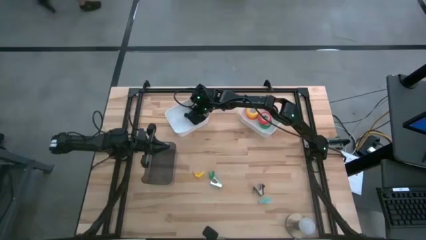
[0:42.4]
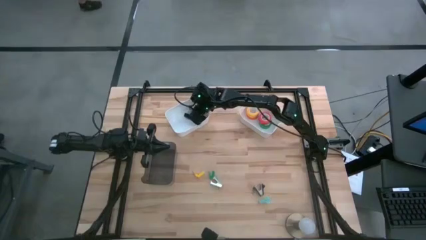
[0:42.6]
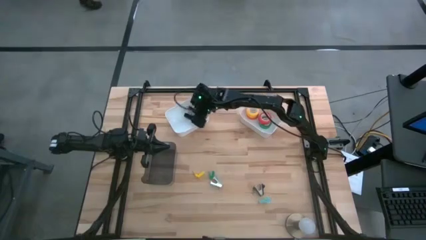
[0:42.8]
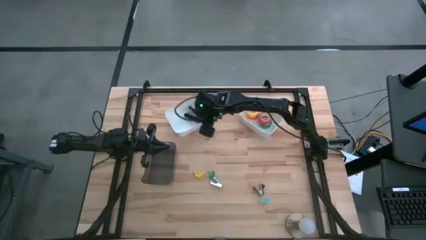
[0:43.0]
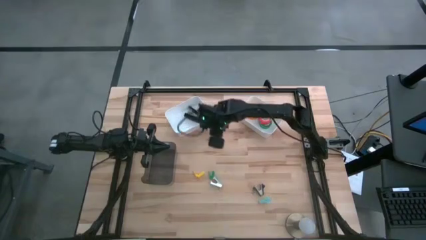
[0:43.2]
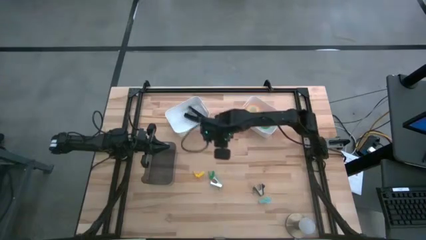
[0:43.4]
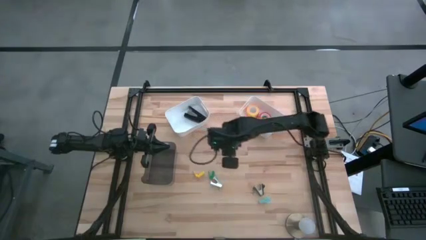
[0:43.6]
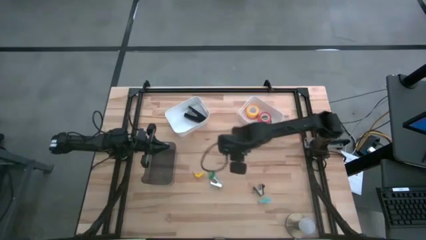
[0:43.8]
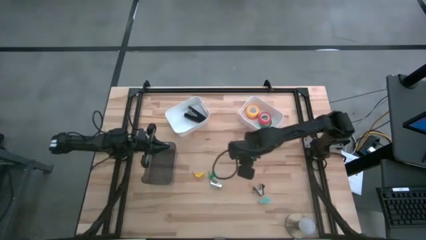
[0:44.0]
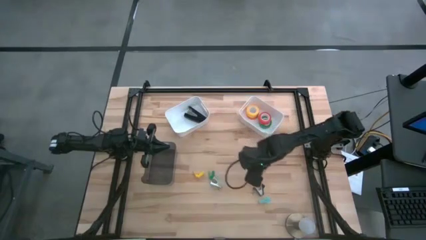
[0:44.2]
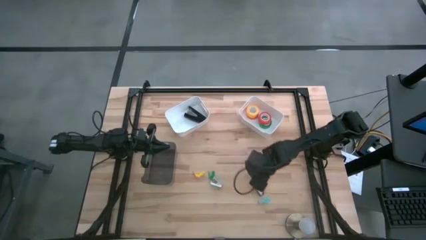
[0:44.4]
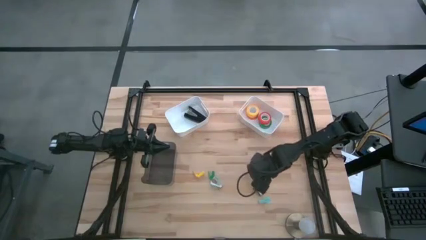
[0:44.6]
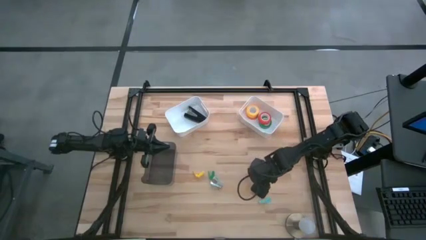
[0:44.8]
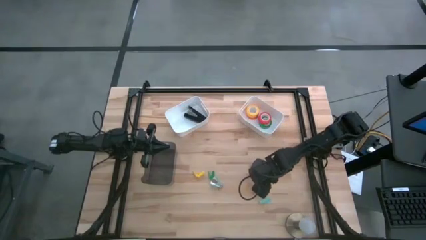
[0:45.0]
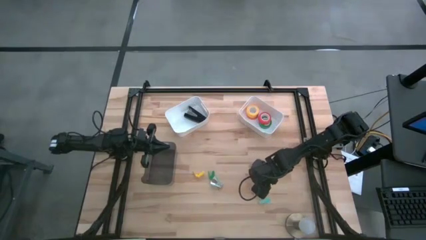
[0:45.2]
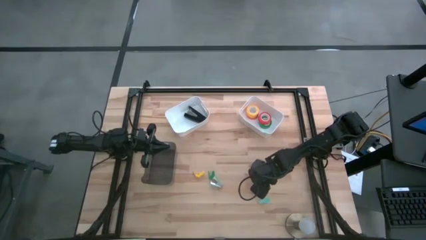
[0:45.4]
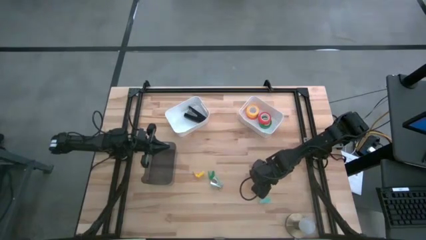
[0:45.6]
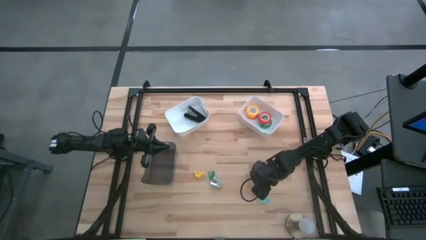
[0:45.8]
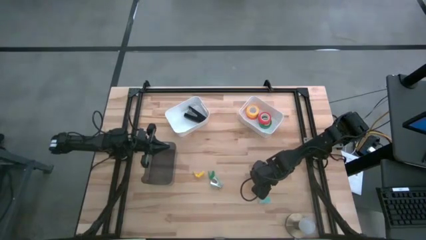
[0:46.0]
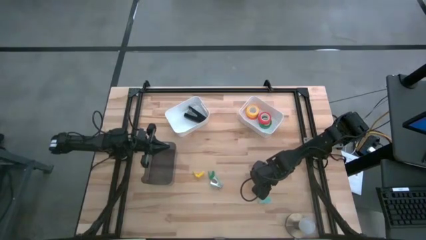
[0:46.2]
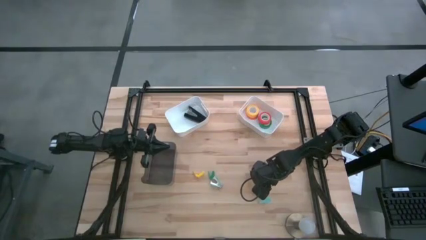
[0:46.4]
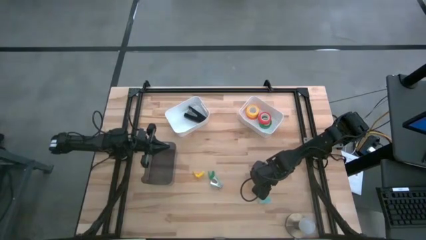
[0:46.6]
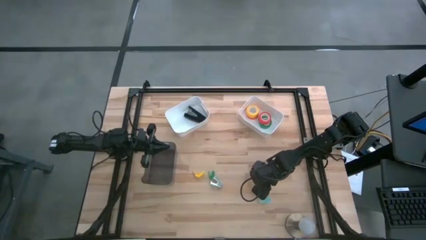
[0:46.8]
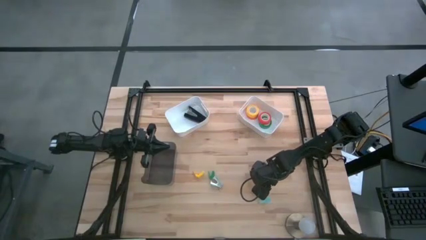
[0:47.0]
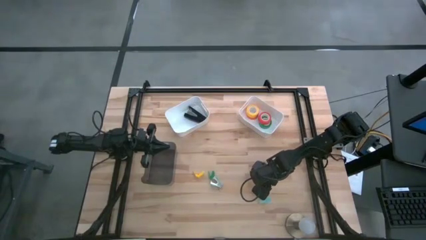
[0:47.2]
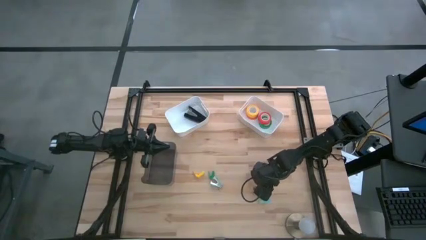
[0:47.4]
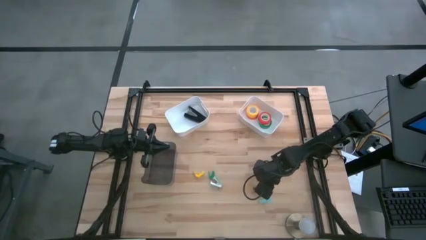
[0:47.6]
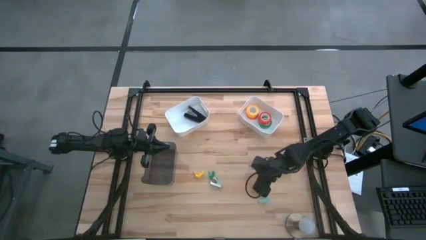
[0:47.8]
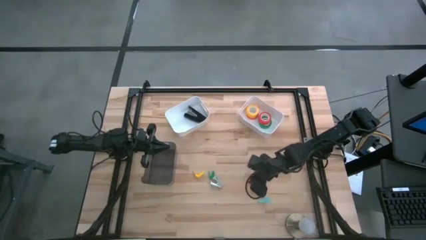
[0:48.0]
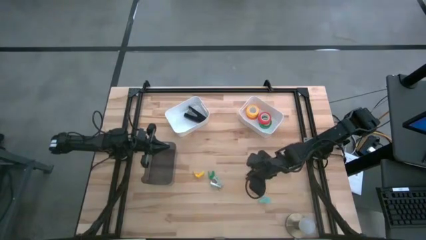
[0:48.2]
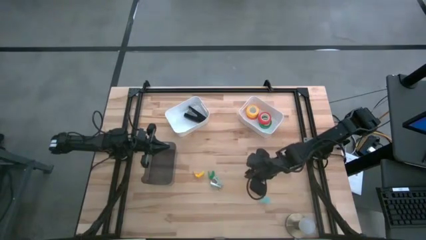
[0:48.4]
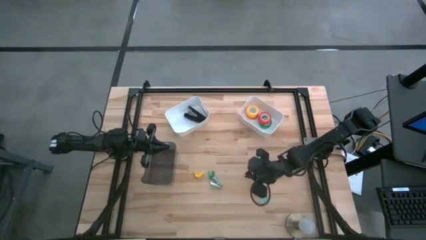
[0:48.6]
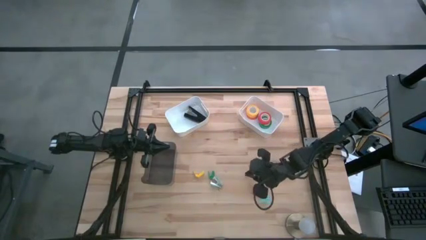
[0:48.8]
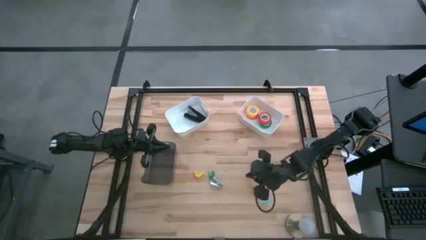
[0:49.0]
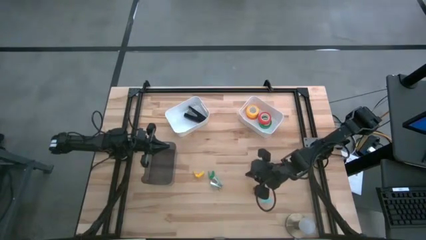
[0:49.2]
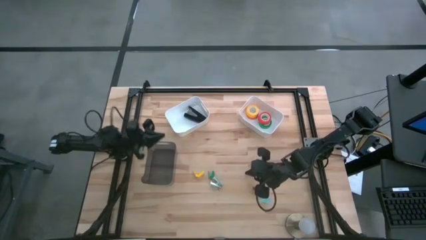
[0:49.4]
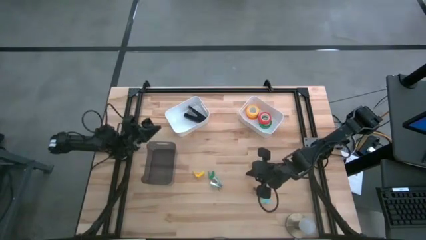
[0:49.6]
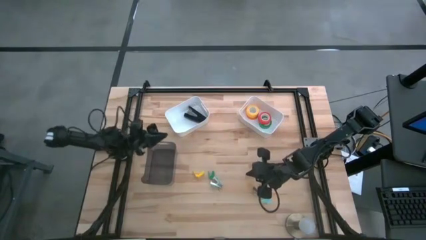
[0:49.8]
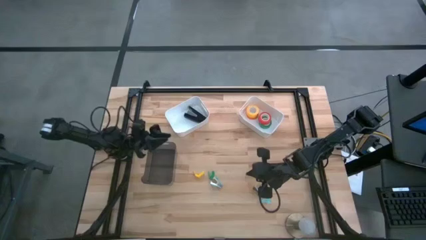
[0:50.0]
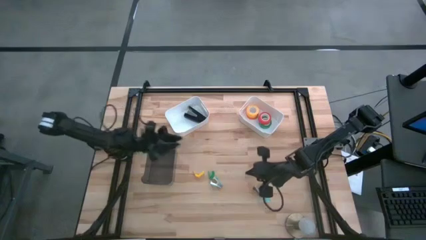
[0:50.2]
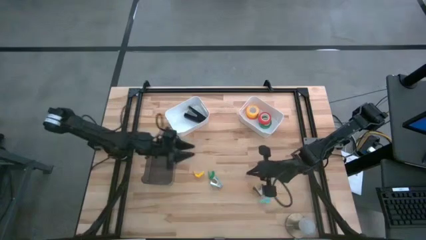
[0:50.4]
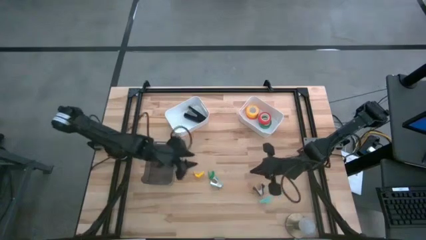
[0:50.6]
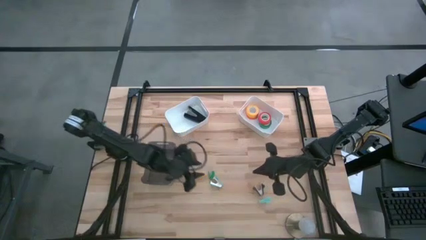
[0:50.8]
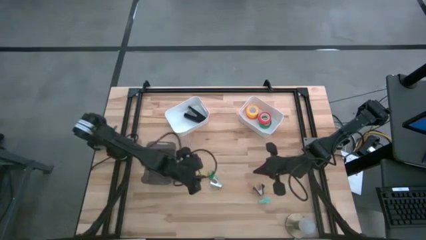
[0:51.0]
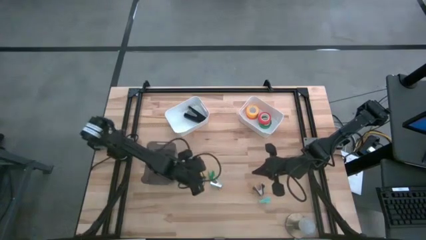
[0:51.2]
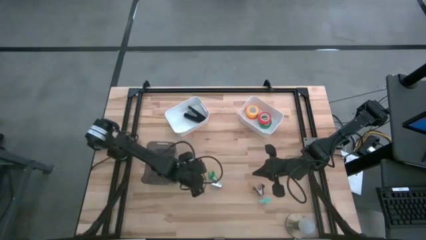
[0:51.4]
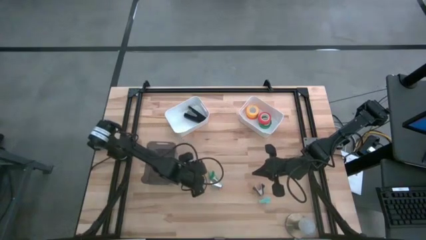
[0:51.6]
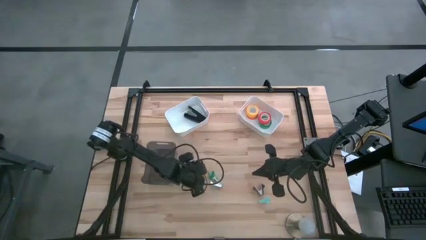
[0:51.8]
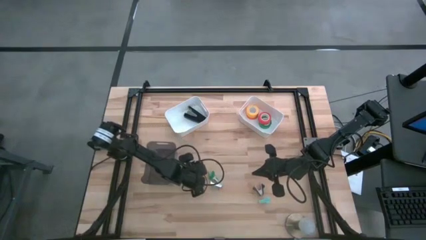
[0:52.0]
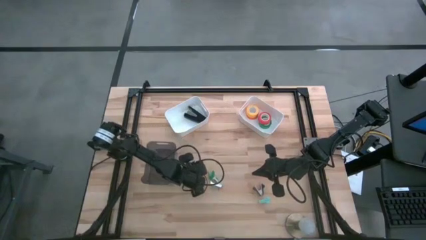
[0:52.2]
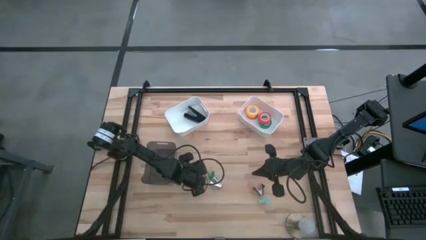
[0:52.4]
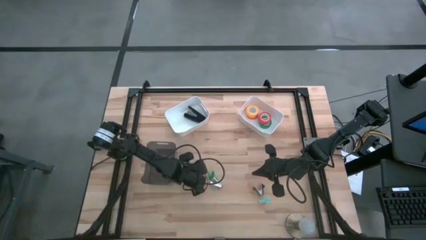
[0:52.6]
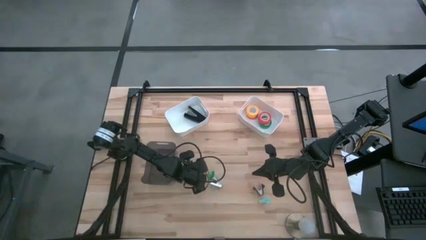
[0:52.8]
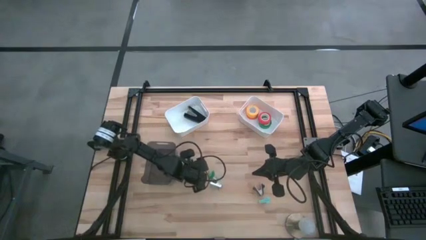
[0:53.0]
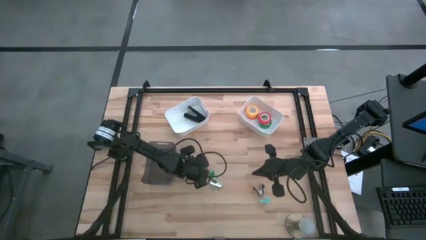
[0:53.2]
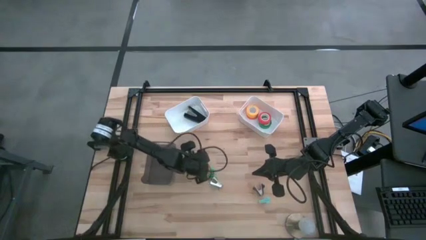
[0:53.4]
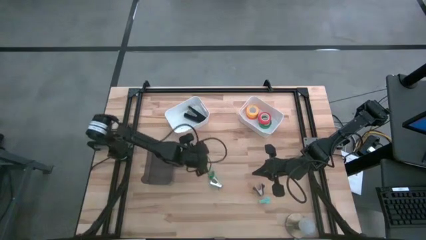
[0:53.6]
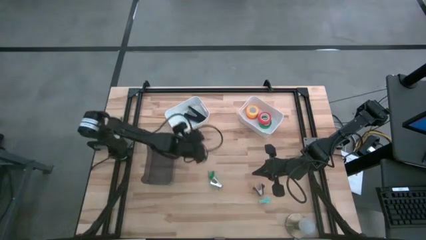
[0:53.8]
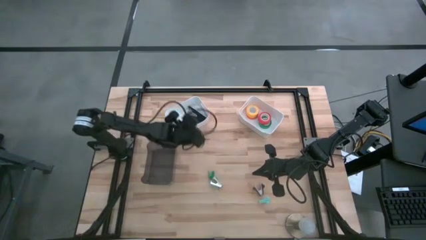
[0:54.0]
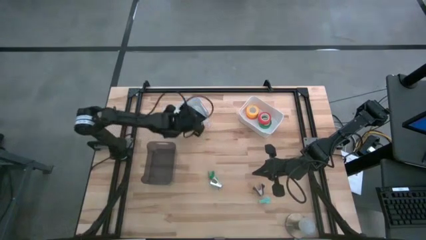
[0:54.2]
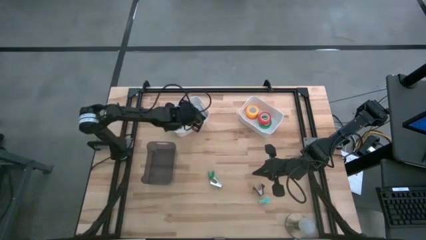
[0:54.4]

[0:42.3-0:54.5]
Task: Pick and place Stapler, Stapler remover, tape
Put the yellow stapler into the left white bin

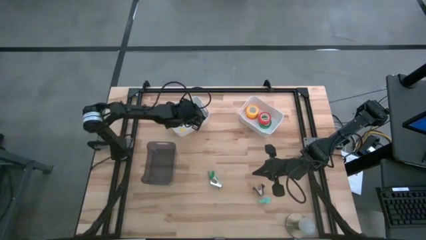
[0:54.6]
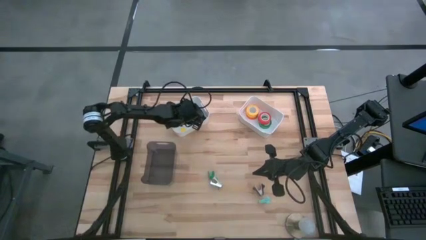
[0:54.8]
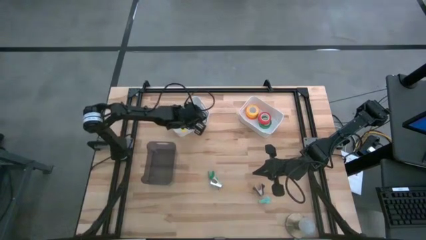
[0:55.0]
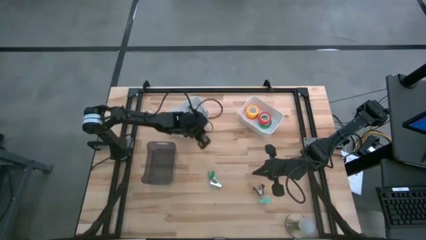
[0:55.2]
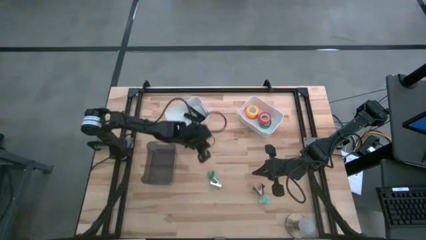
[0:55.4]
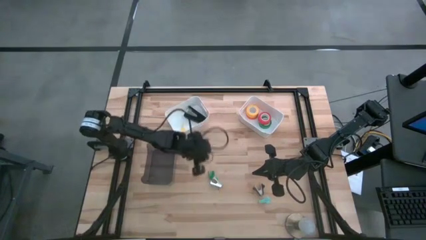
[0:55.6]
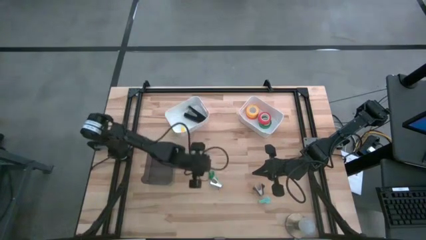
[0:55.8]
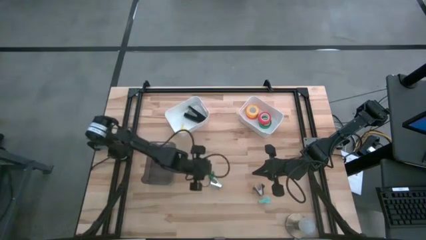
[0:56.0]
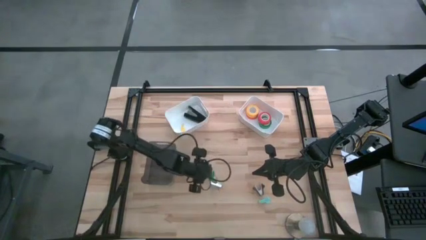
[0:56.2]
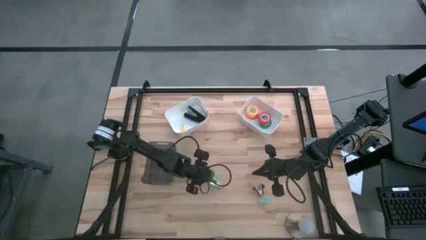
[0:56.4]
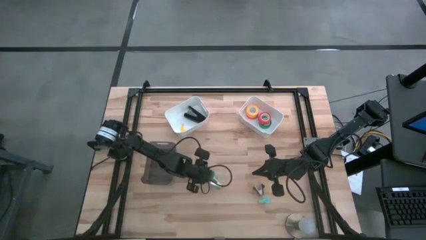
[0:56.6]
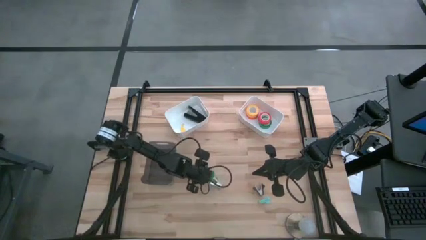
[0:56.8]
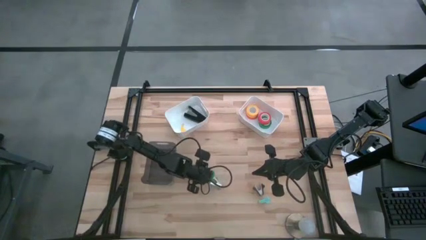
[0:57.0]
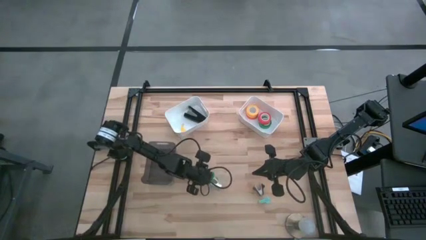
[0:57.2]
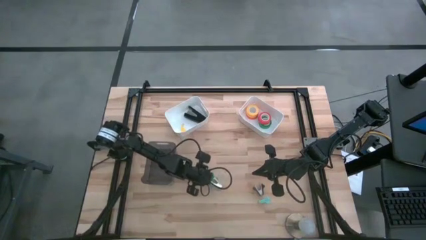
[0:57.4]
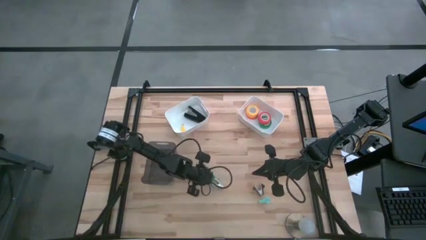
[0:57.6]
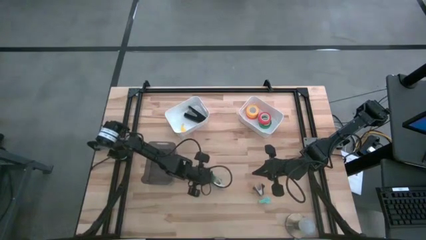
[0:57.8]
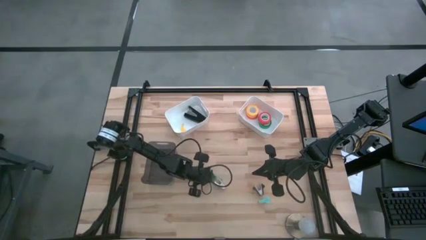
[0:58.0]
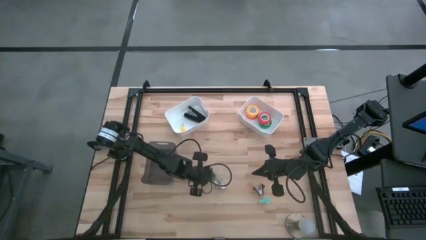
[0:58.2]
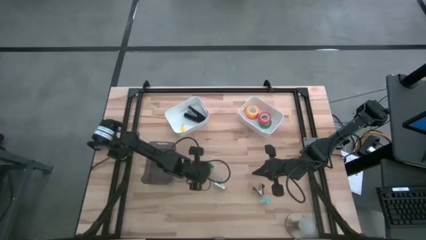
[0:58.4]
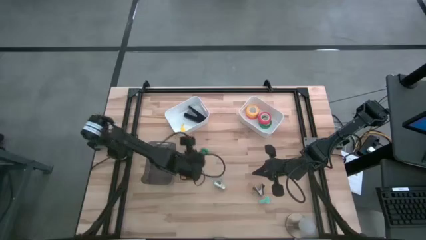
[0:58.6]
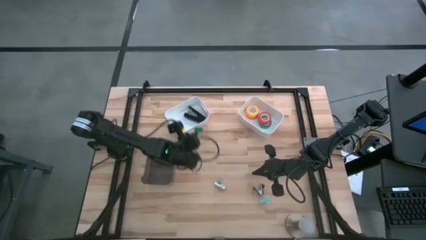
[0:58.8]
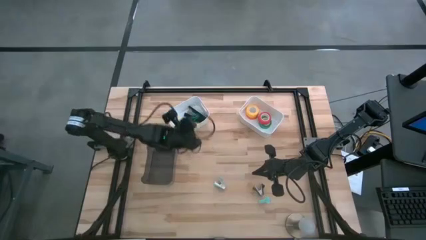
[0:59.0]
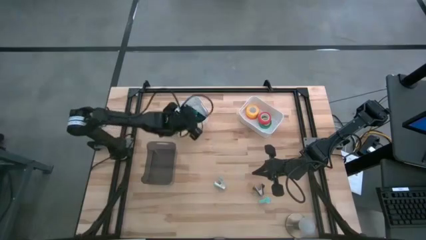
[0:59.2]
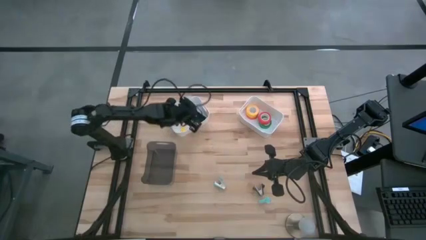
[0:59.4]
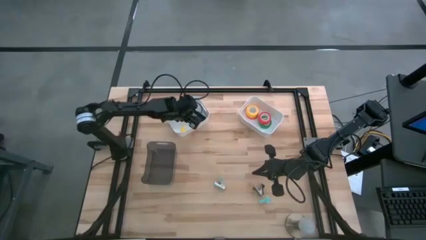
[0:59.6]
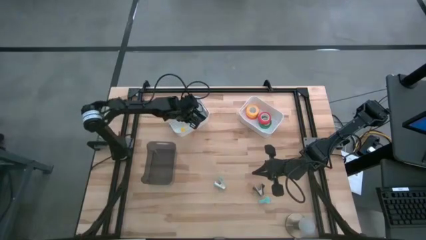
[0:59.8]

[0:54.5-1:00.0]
Put the green stapler into the left white bin
